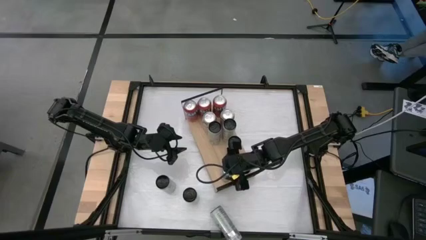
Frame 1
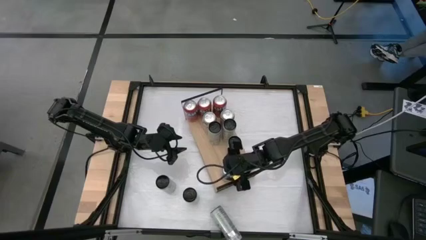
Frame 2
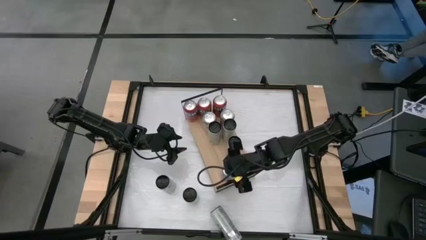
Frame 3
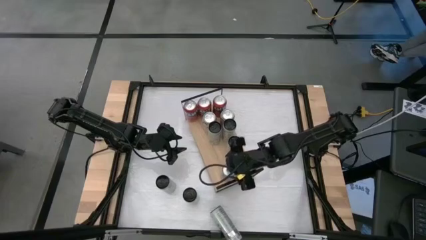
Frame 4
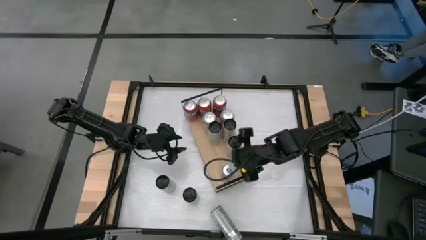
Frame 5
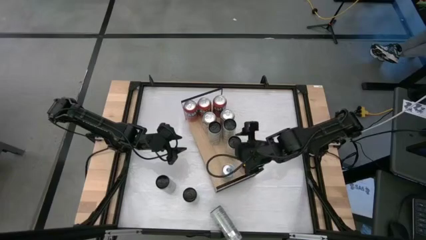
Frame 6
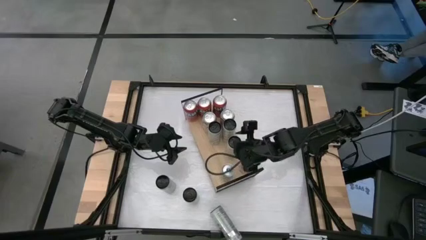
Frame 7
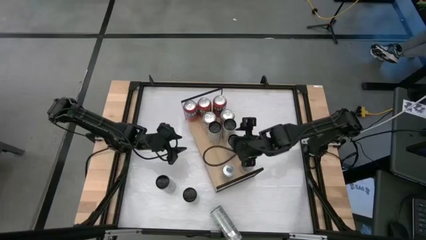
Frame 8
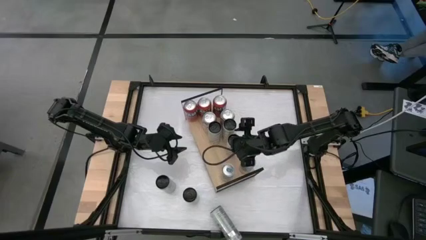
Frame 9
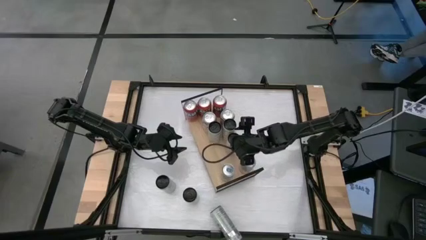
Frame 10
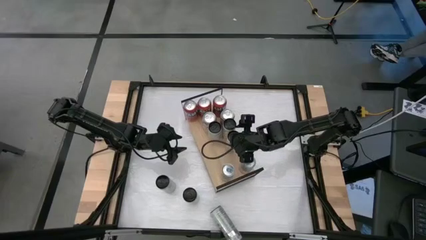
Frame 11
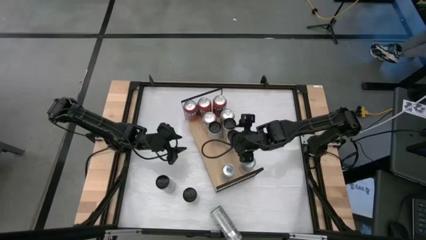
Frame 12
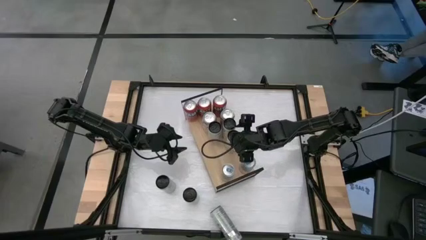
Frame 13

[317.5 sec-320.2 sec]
Task: Place canned beverage on shelf
Adjust the yellow soda can on the shelf

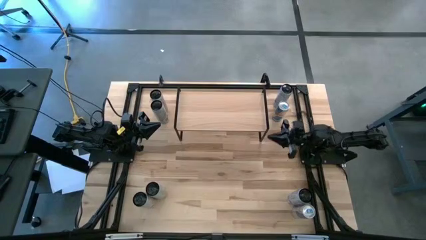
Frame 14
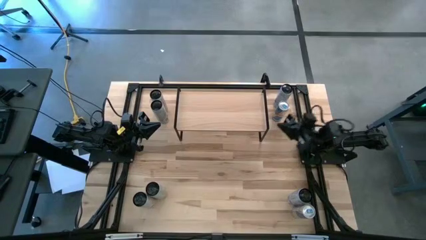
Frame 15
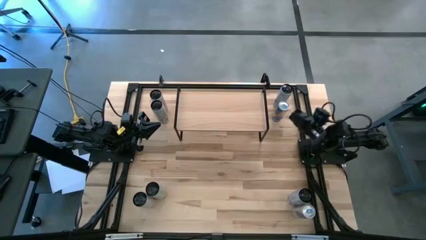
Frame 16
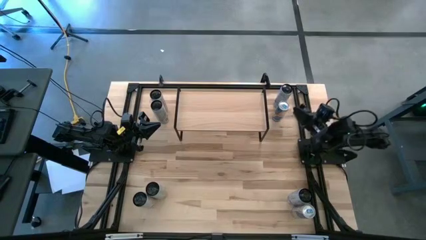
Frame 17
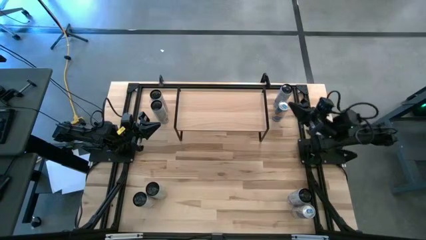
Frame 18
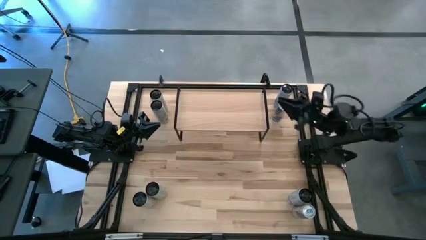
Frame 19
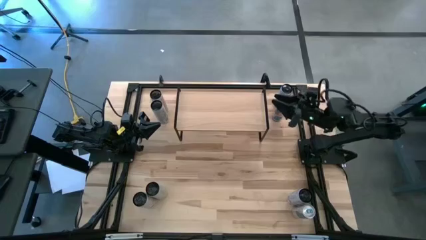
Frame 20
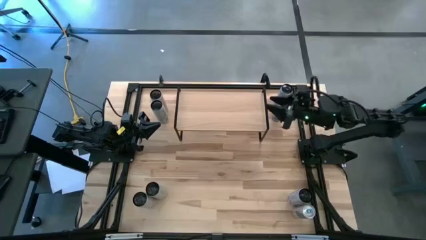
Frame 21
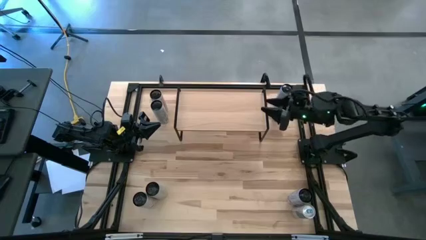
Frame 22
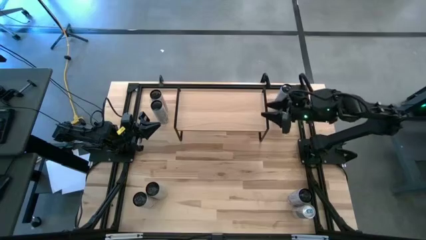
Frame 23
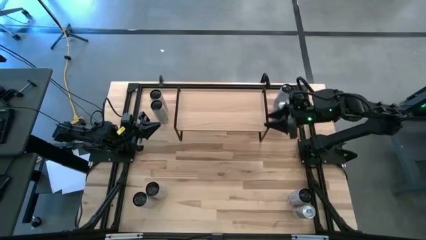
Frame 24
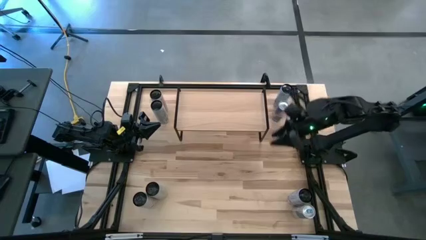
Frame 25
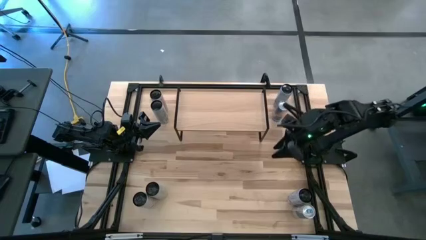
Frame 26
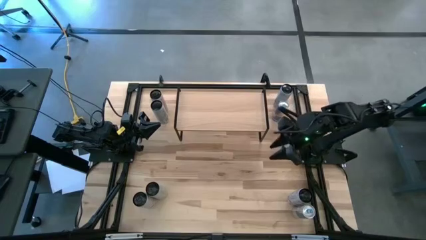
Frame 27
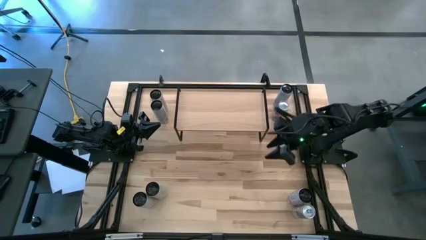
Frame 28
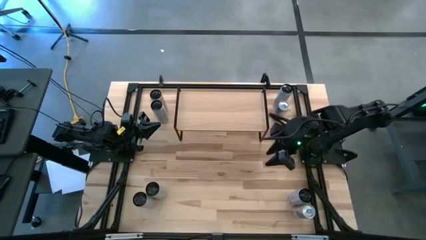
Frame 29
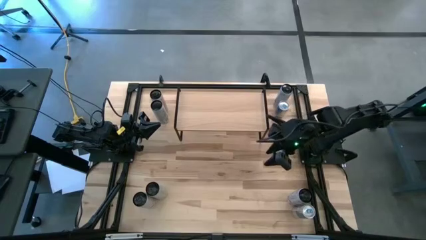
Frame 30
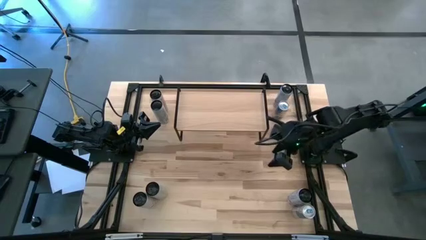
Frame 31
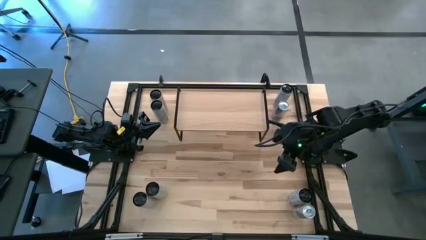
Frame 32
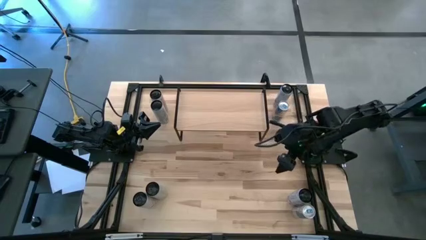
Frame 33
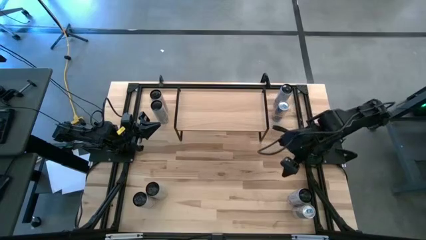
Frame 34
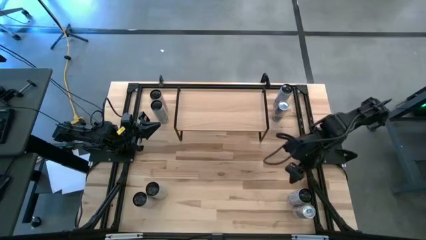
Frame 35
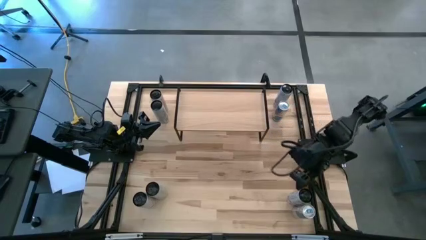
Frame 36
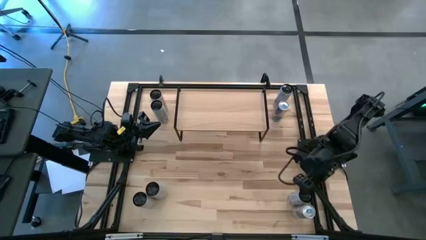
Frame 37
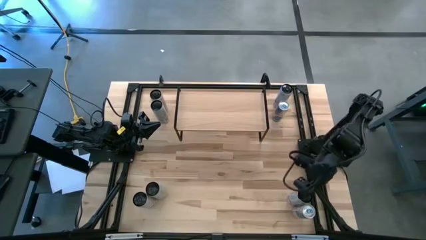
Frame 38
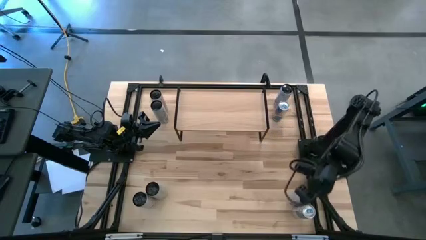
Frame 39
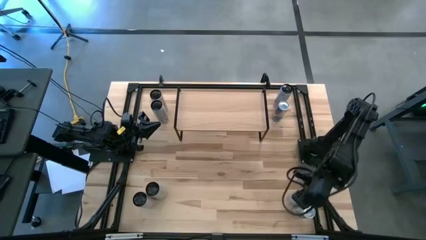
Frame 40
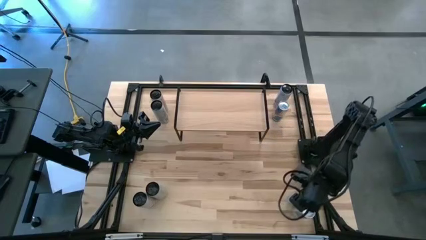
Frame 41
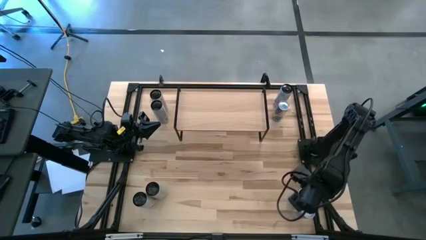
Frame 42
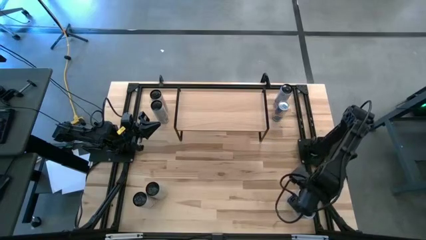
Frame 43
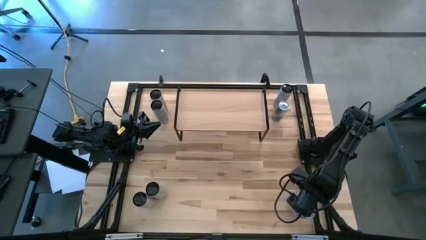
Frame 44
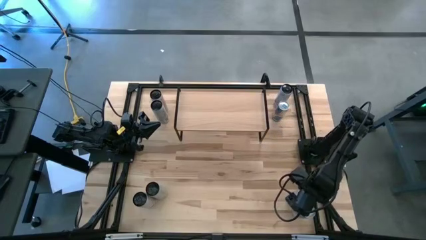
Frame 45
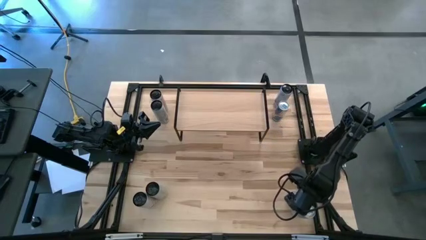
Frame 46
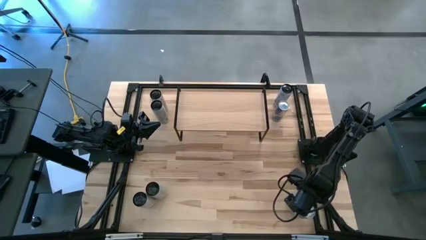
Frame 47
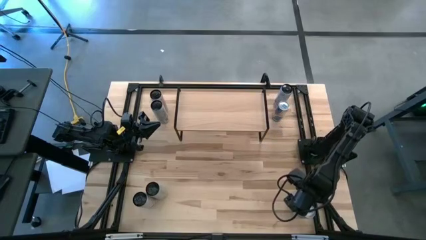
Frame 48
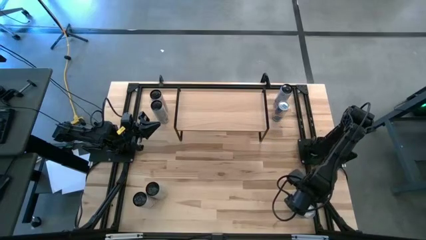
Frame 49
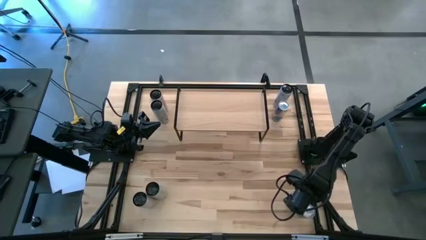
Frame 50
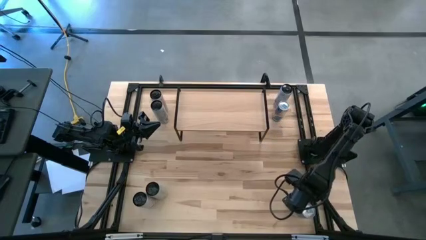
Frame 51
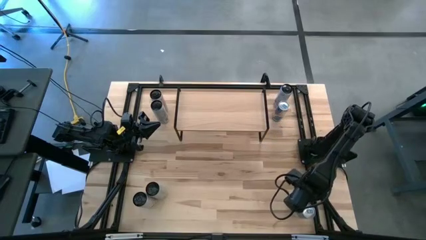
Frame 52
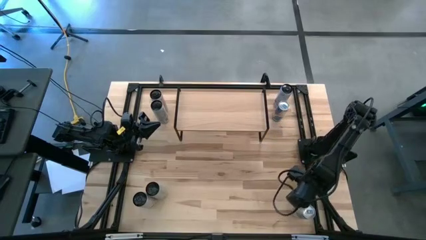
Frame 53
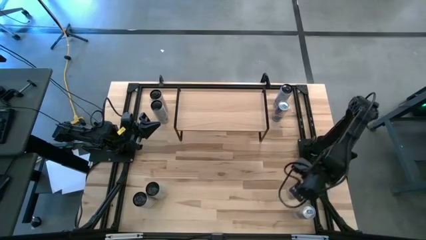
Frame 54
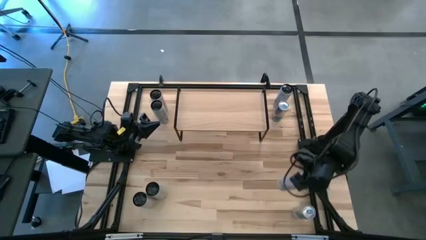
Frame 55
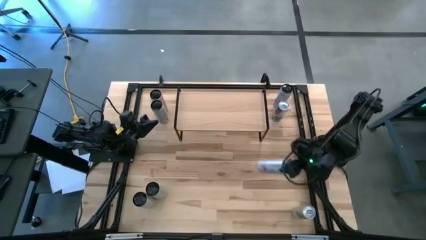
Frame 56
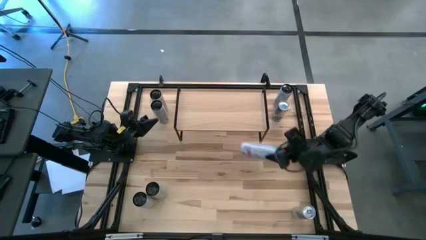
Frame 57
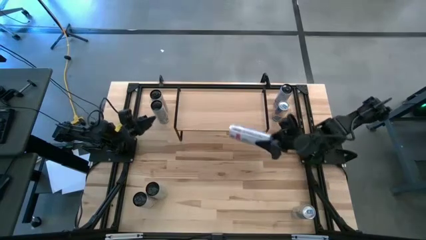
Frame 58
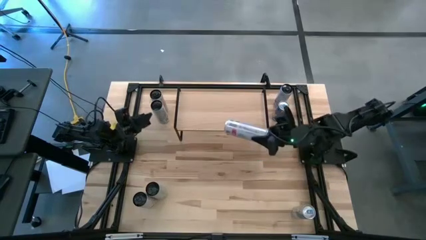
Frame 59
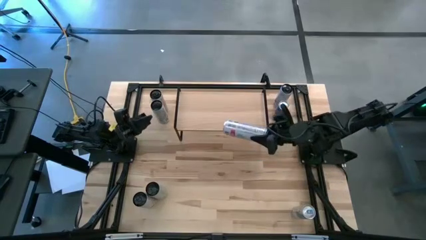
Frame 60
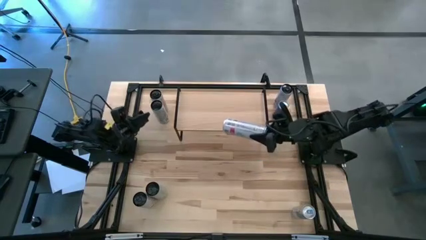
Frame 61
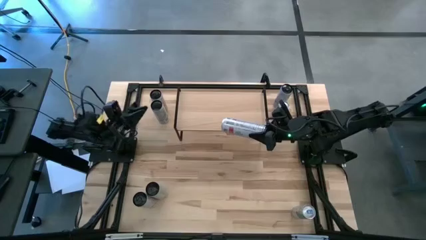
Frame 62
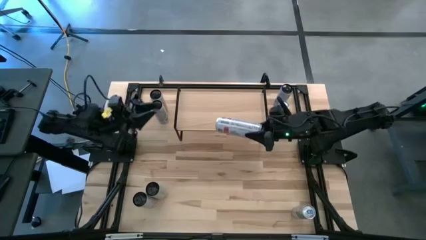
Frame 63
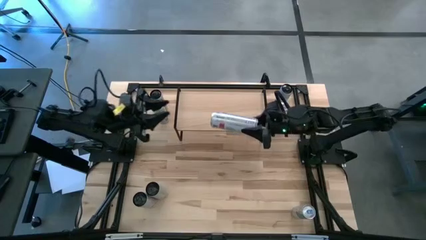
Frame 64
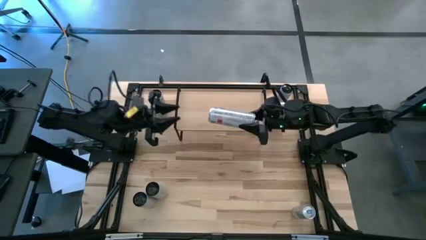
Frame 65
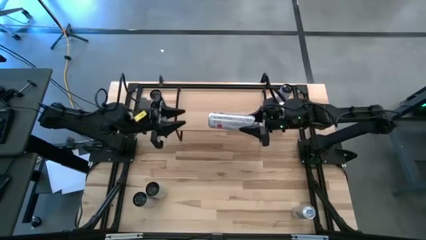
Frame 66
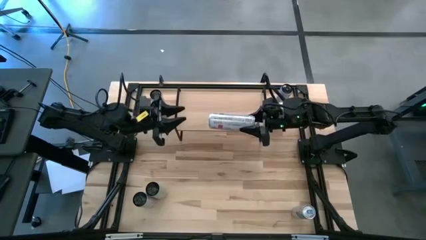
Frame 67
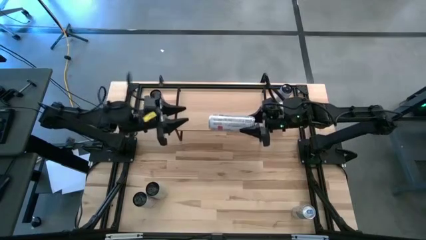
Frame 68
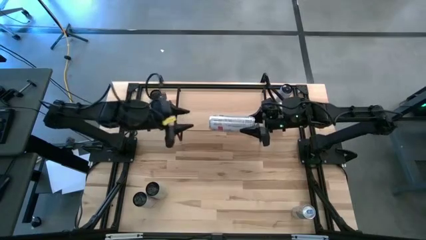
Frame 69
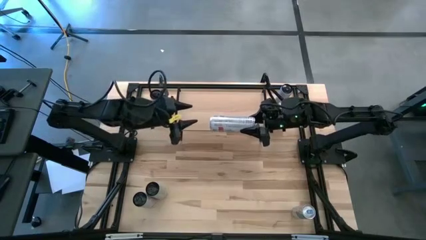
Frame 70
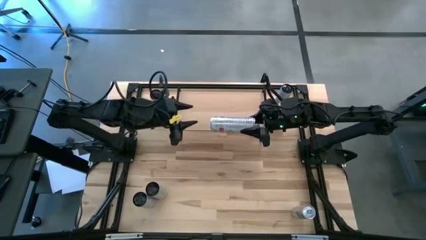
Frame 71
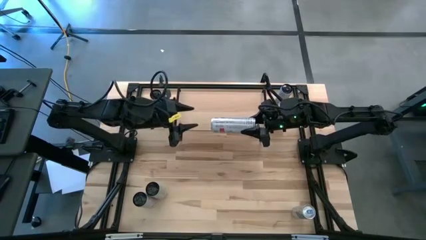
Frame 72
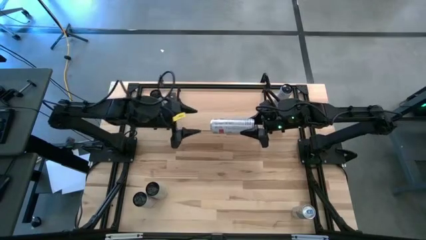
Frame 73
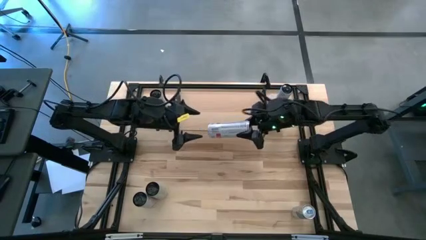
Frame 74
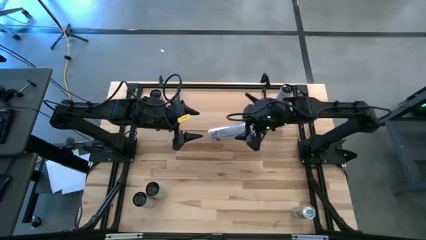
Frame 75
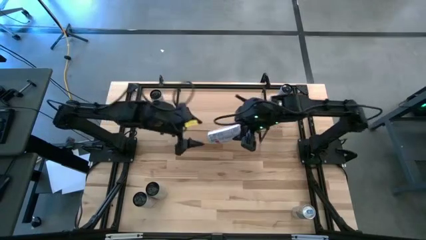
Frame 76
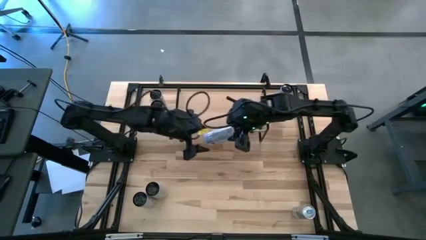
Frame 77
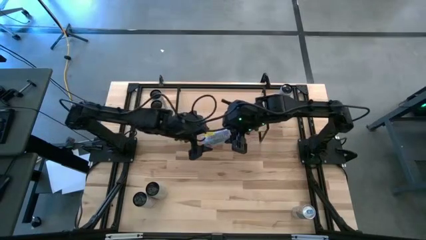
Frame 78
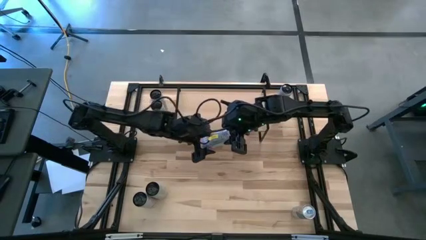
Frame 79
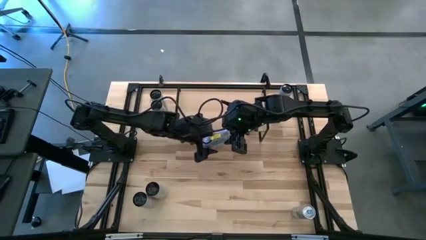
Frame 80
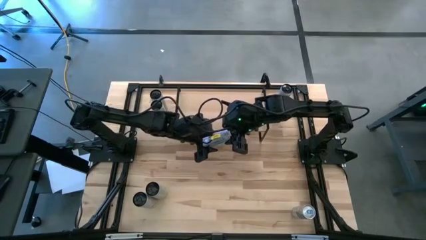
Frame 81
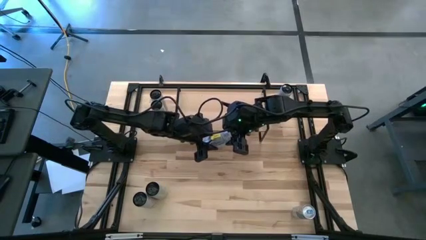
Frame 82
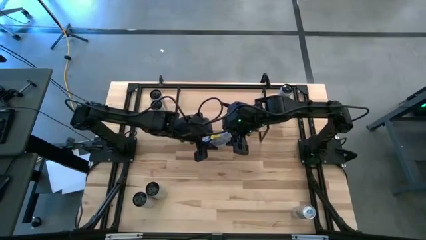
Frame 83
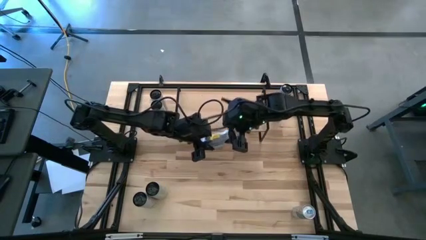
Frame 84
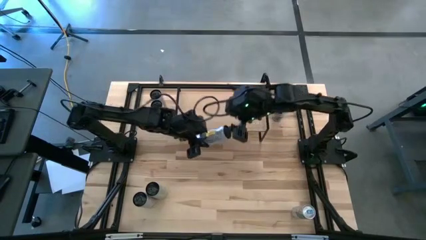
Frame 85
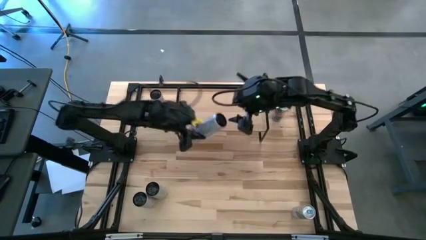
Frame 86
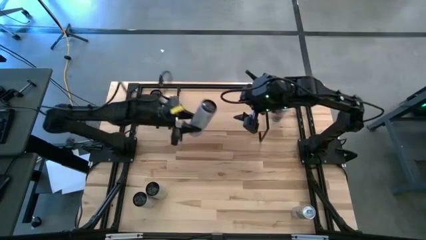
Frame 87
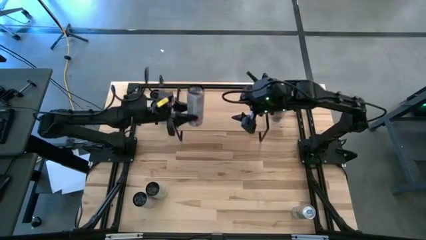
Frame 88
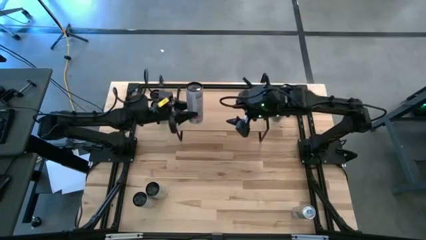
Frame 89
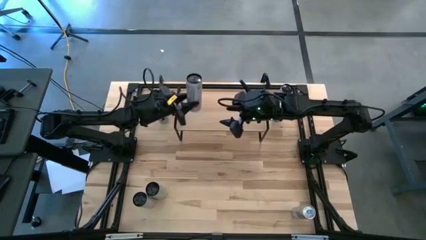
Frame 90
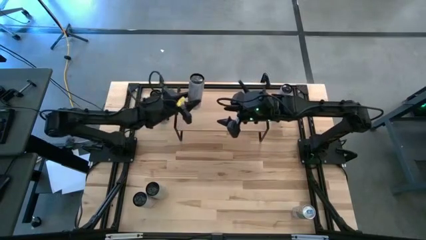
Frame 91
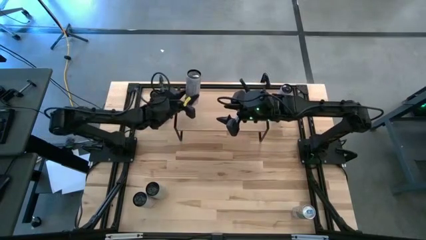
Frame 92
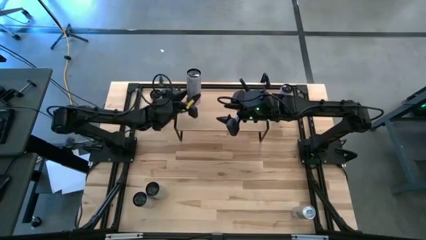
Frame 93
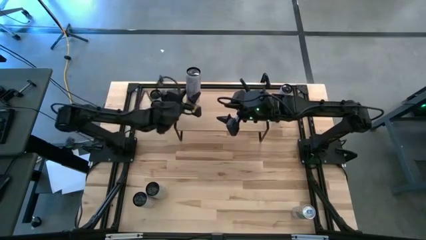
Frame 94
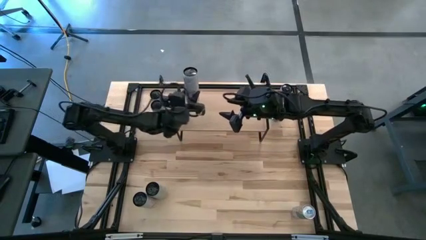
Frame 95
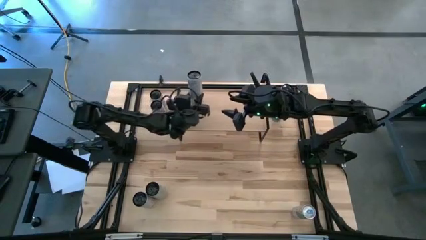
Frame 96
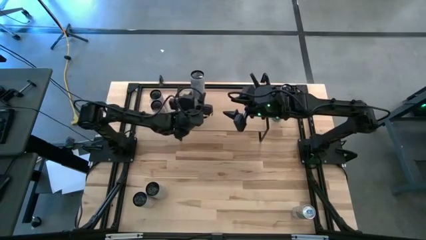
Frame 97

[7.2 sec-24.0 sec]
Task: Place canned beverage on shelf
Put the right white pink soda can on the shelf
